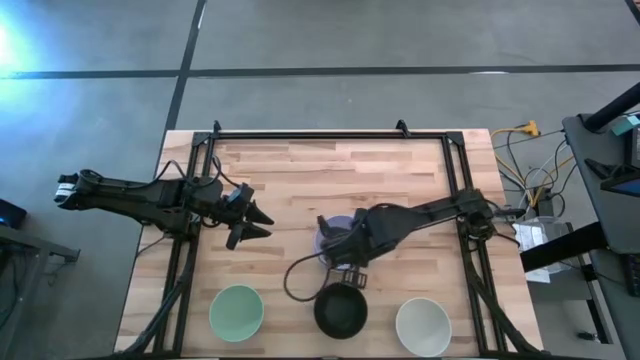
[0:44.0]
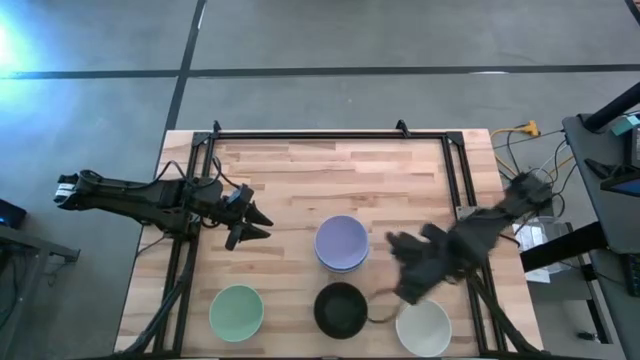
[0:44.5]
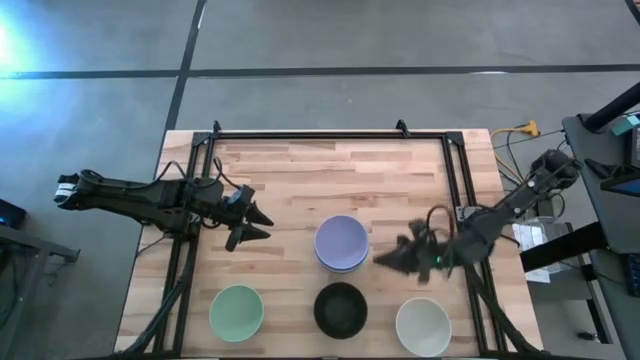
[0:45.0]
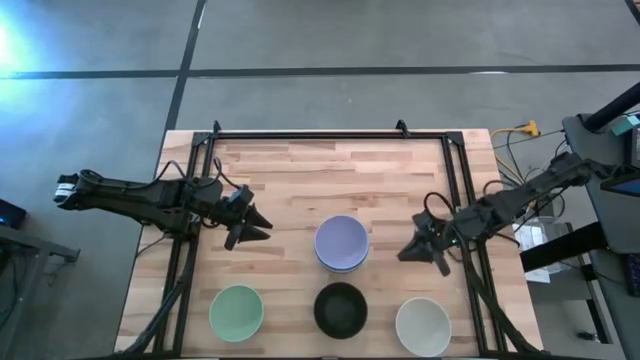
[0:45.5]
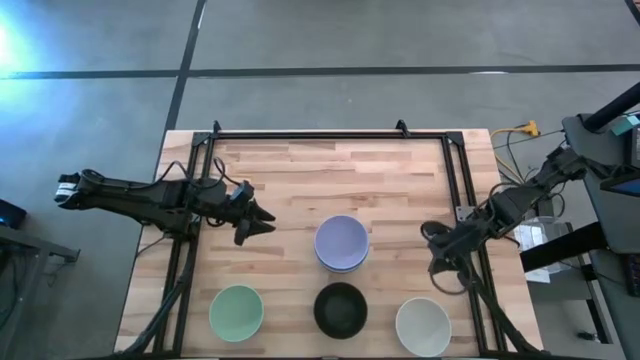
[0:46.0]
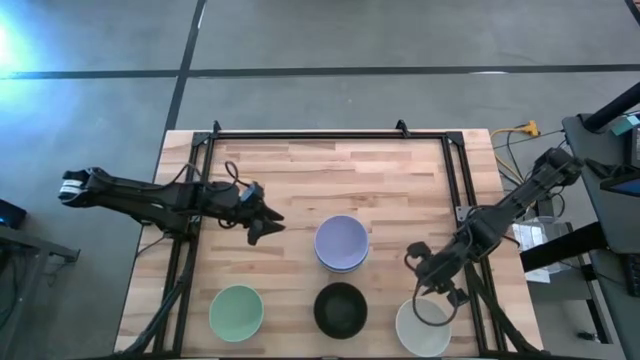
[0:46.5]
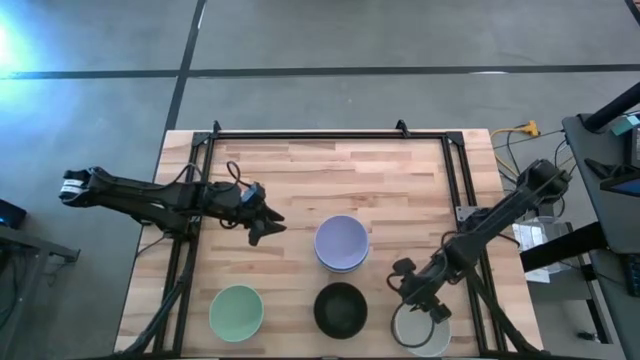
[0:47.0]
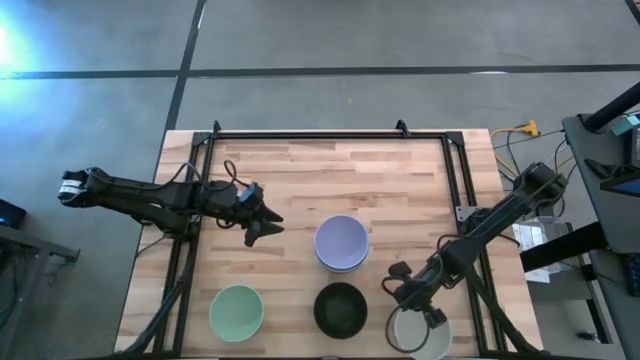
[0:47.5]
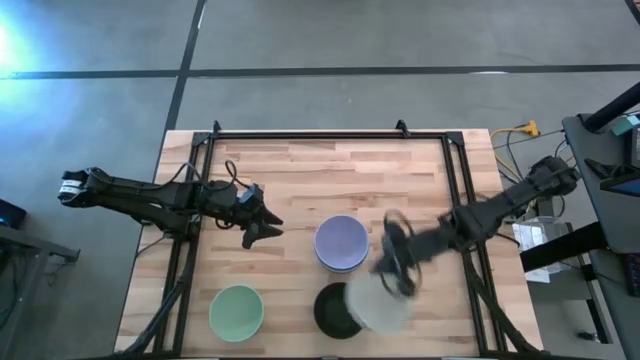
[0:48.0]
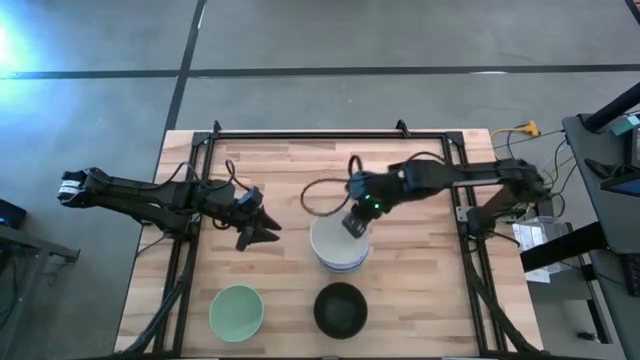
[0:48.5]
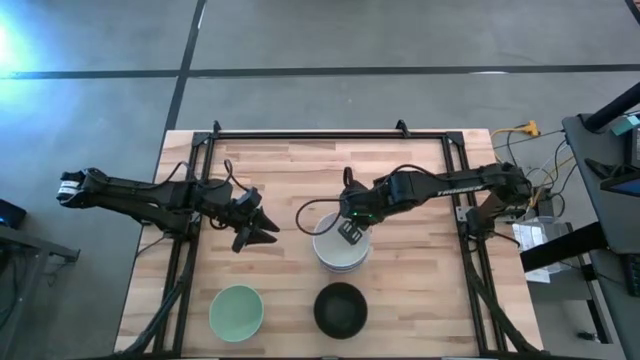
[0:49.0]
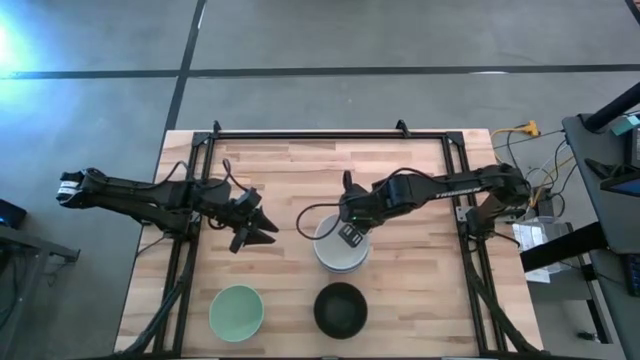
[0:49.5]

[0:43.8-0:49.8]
Task: Nest bowls inside each other
Stack the white bowl on the purple bowl

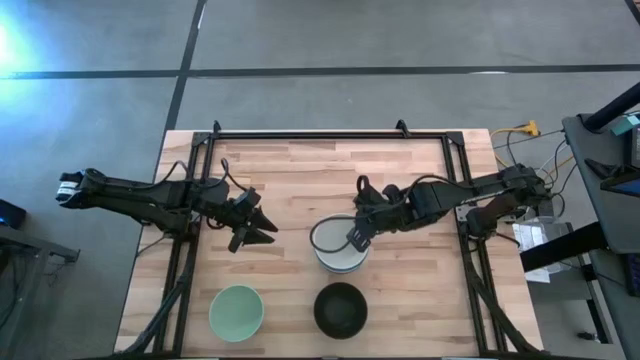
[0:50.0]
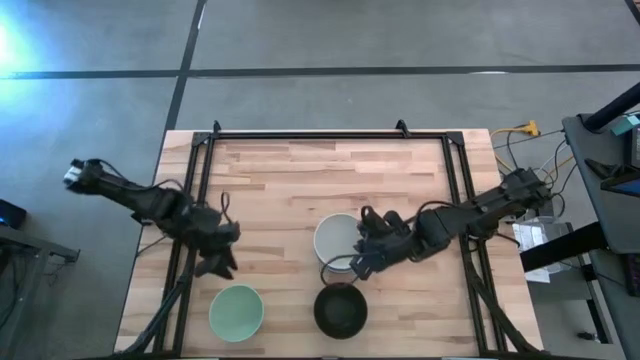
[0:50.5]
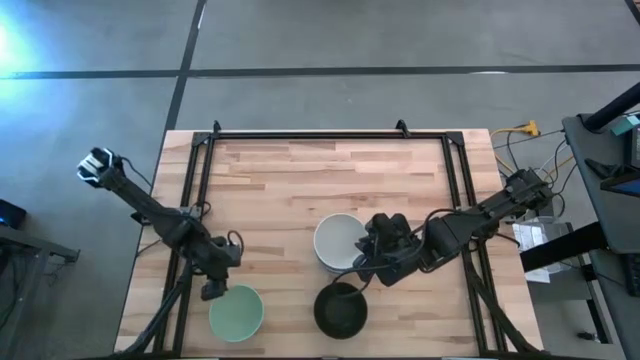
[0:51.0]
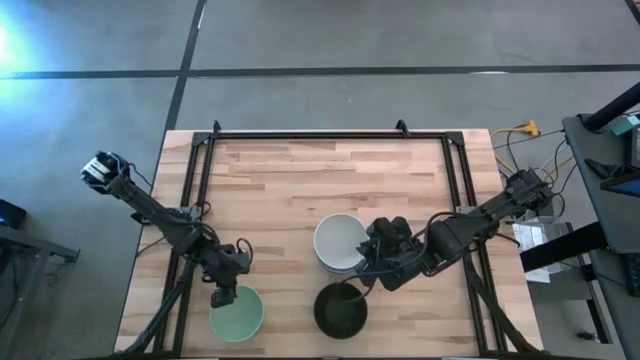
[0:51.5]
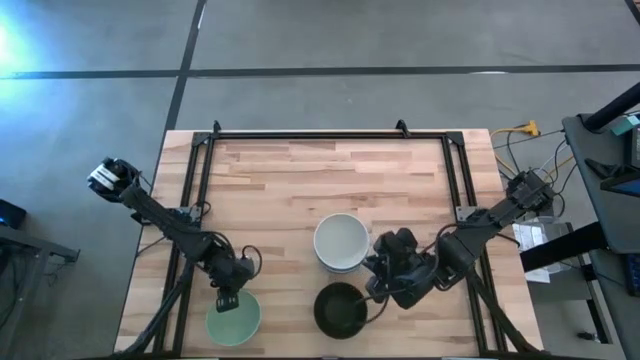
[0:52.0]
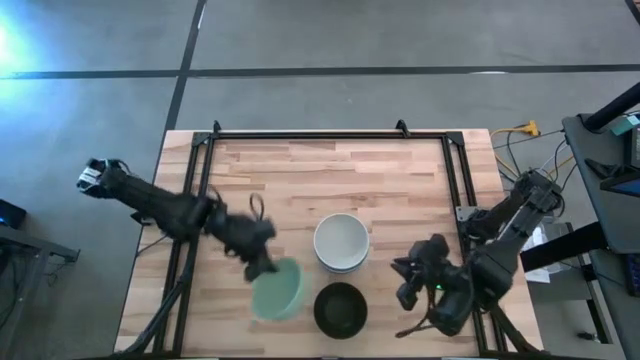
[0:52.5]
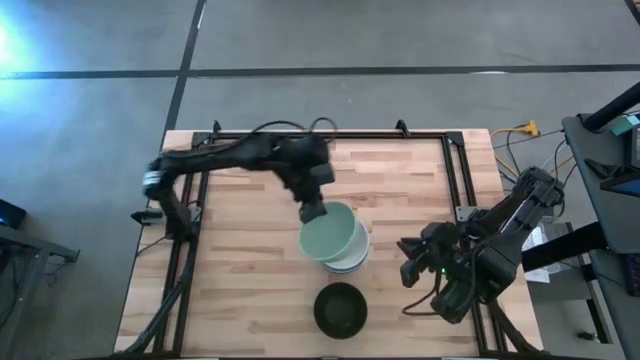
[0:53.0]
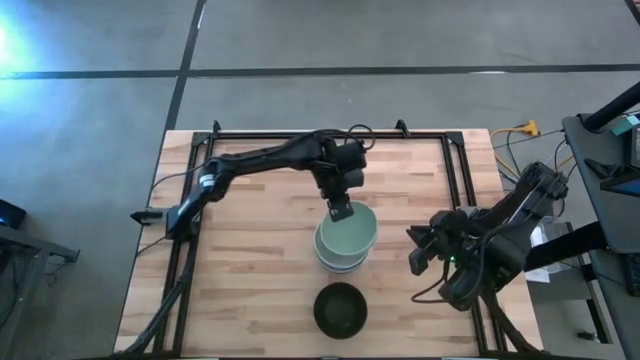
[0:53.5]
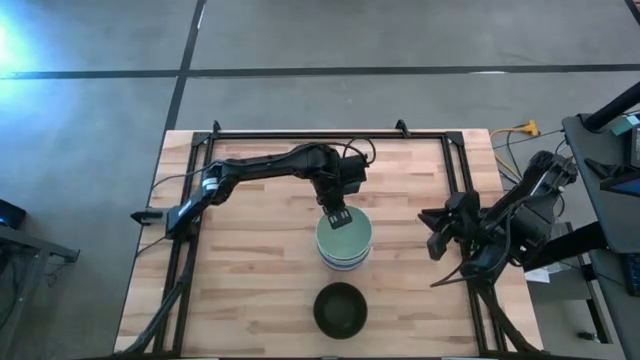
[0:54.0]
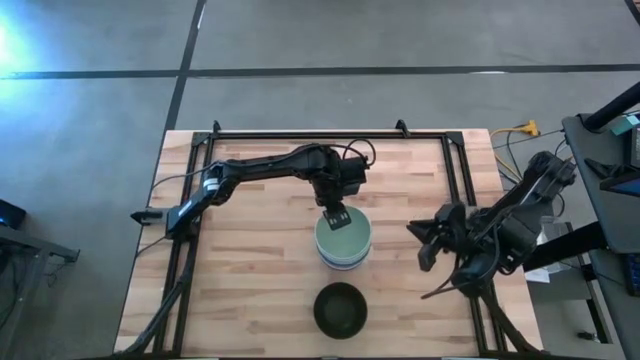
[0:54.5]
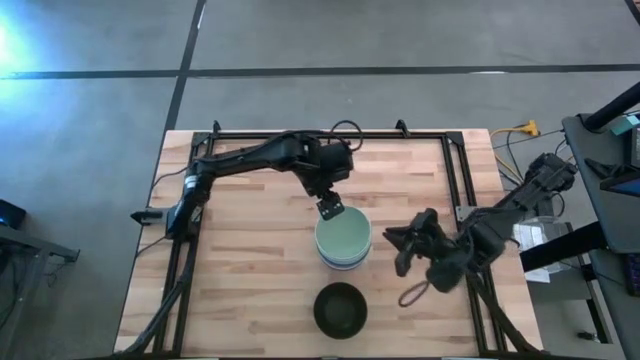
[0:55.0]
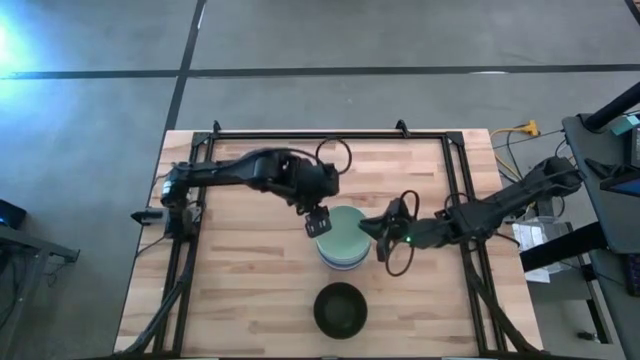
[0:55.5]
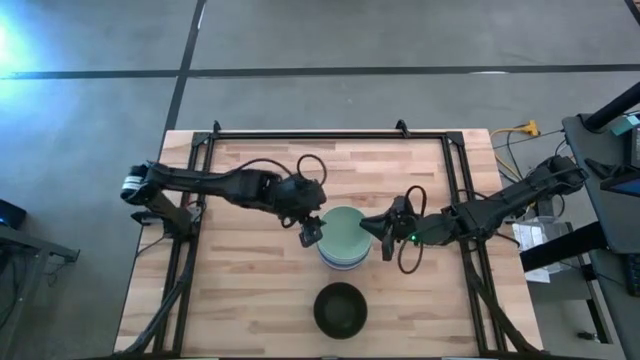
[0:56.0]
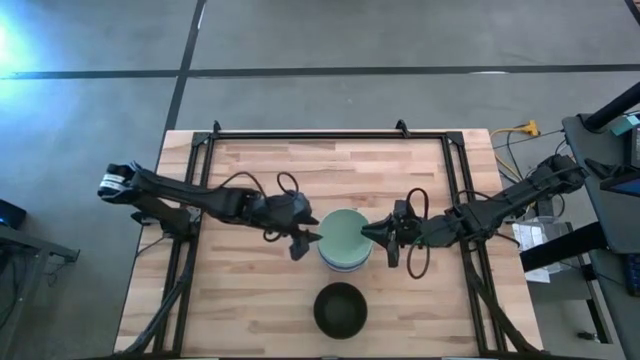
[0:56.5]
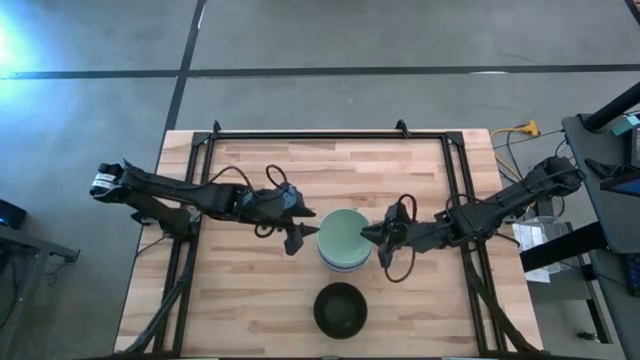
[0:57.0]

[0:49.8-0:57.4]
Stack the light green bowl on the white bowl

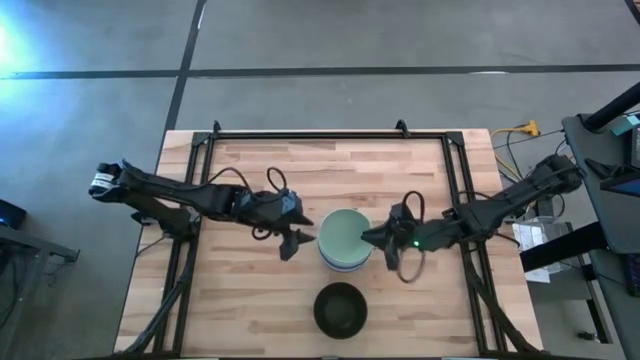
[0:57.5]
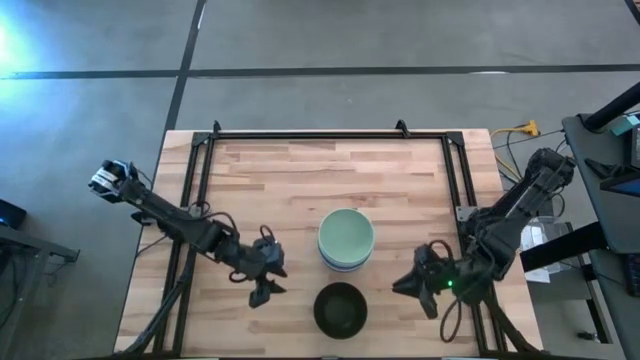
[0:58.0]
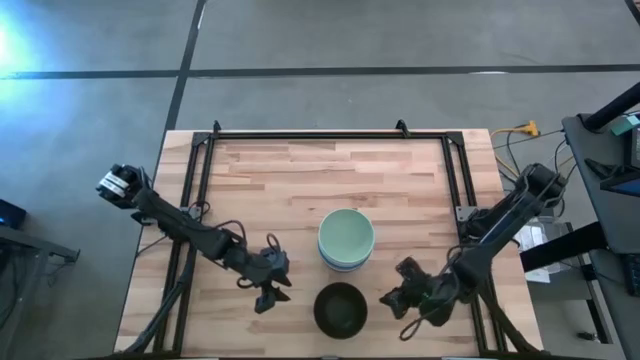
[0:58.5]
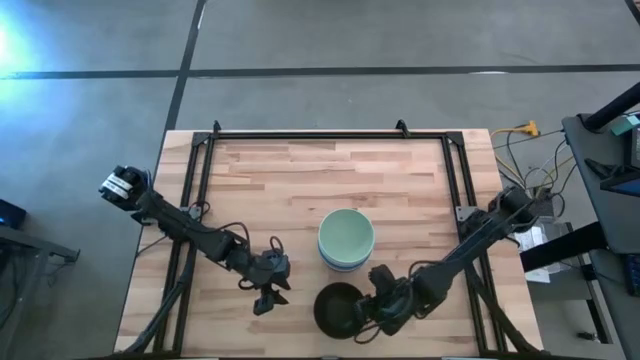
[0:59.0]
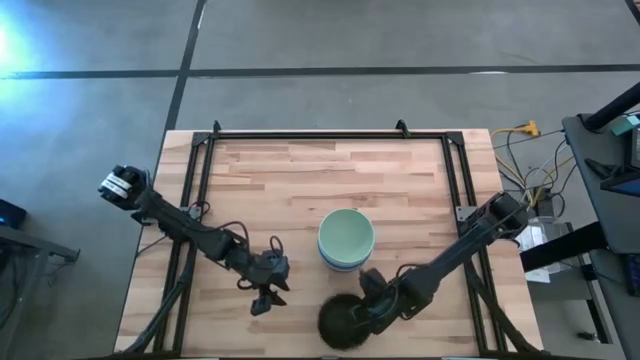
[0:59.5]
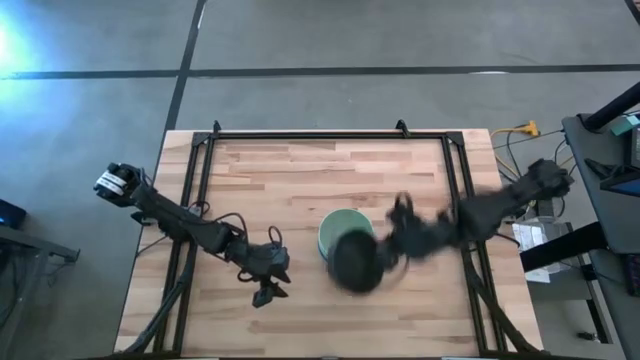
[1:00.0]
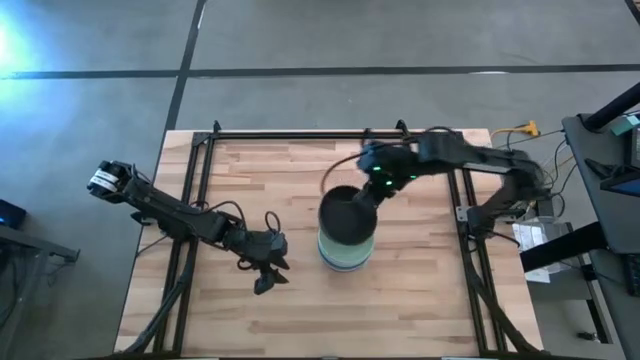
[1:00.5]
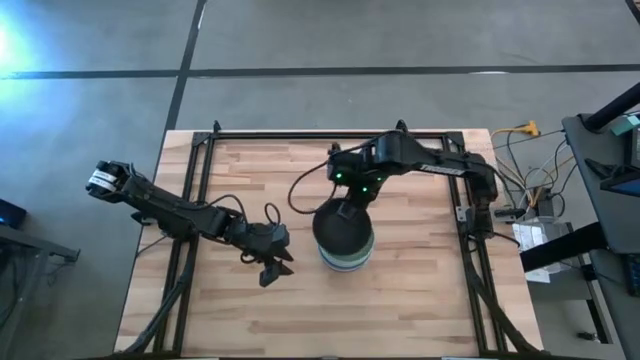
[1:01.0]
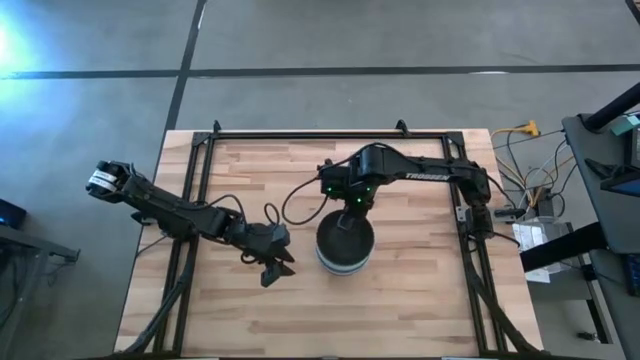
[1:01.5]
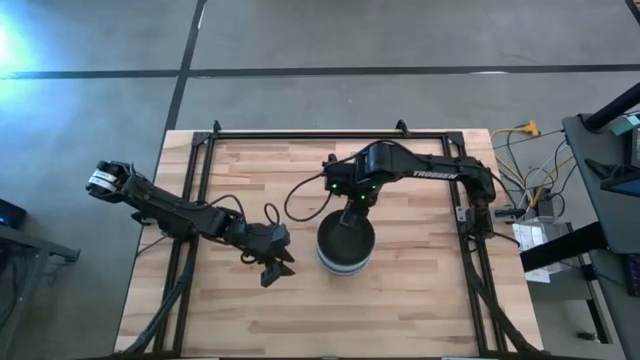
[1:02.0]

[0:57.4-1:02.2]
Stack the black bowl on the light green bowl

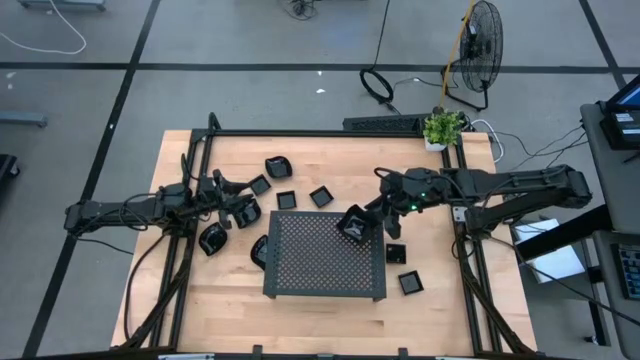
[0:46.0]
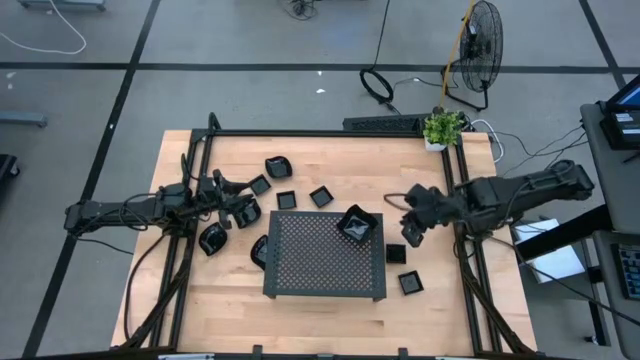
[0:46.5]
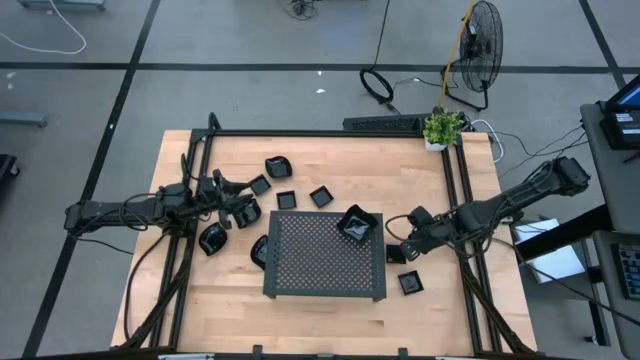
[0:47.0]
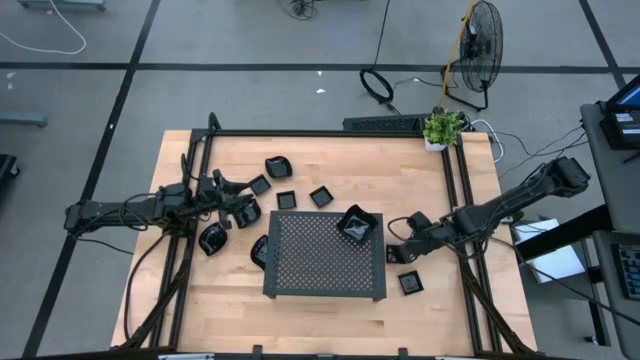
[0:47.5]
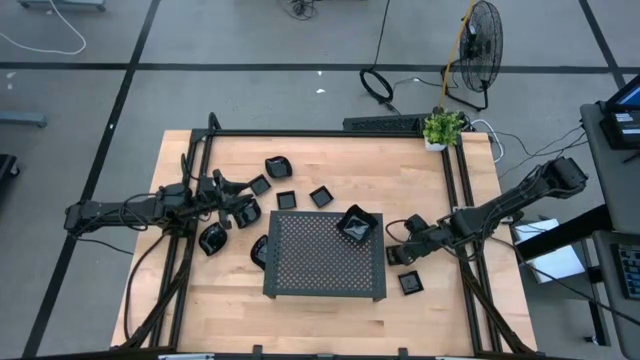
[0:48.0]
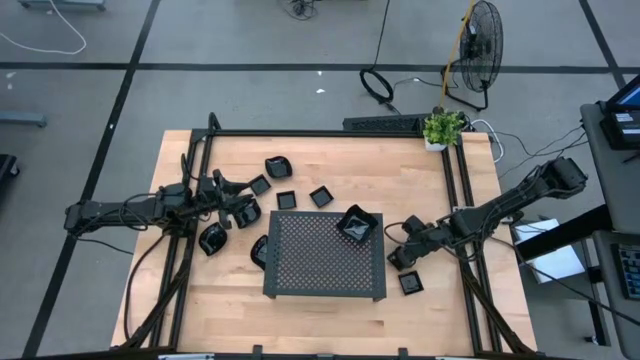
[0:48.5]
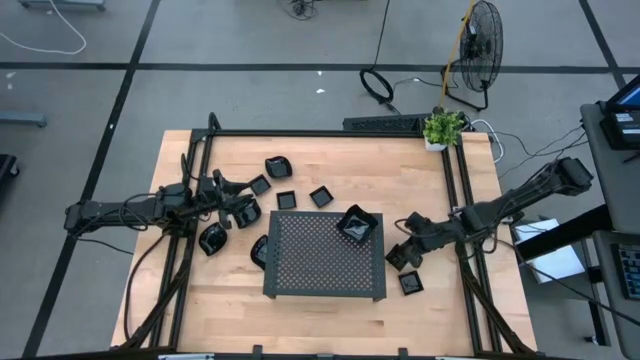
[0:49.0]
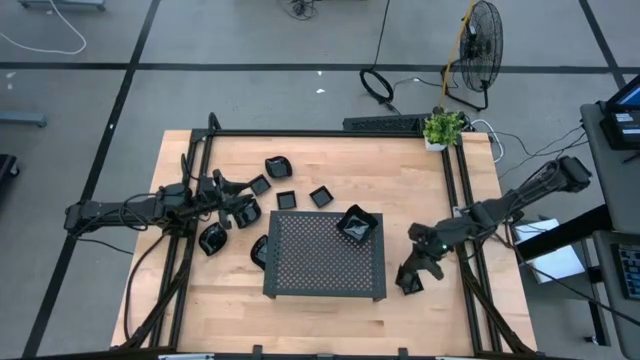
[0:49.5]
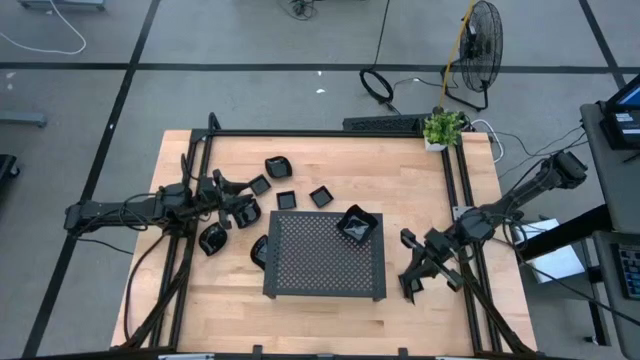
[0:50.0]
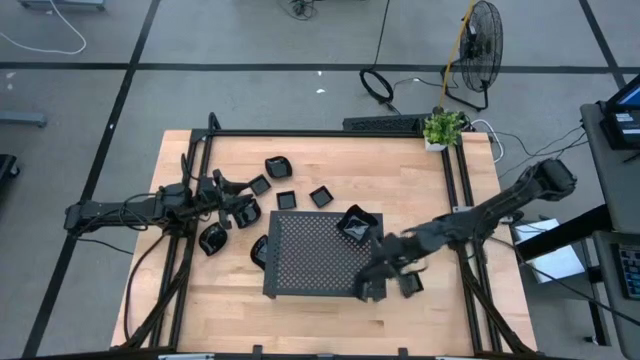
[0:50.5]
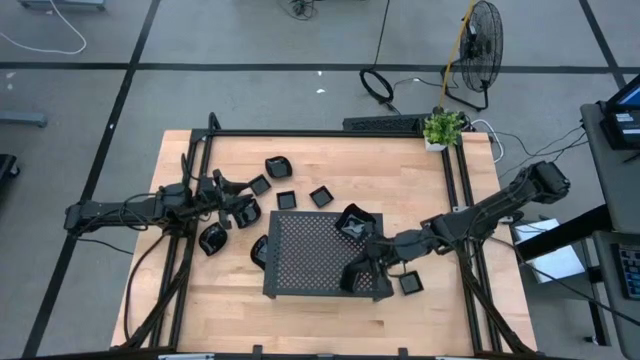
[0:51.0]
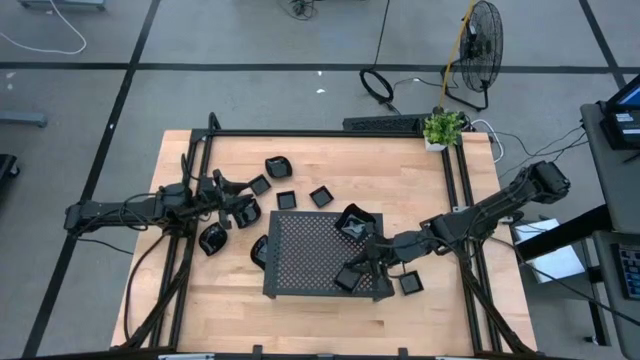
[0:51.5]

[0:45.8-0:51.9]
Task: Pick & Place Mini shaped plates
Put the black square plate on the shelf
